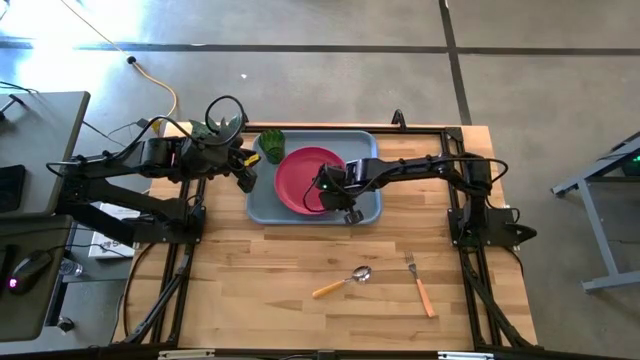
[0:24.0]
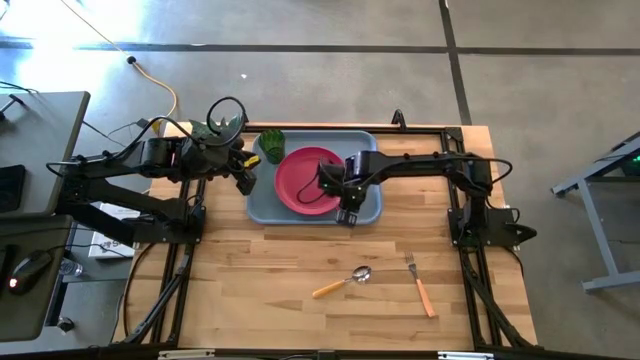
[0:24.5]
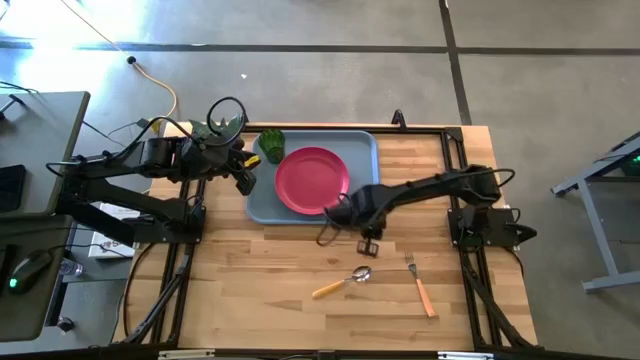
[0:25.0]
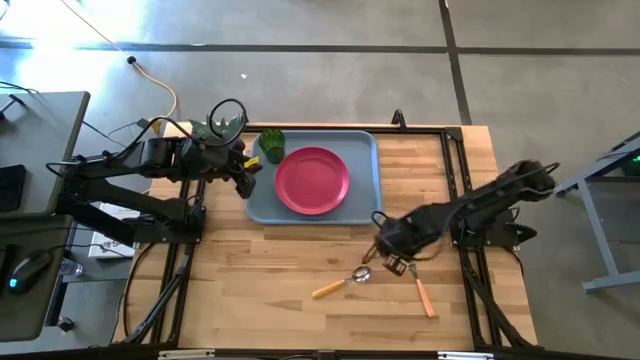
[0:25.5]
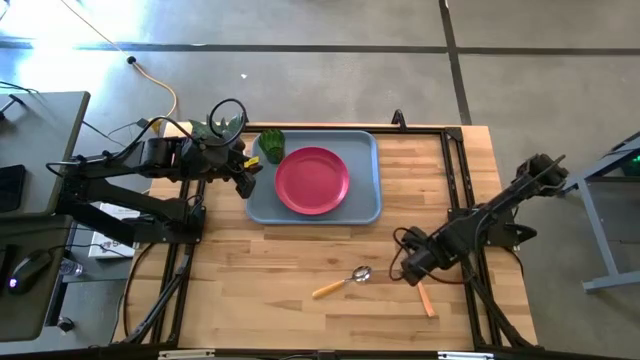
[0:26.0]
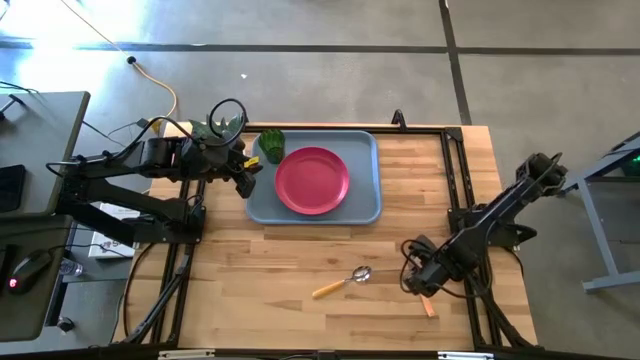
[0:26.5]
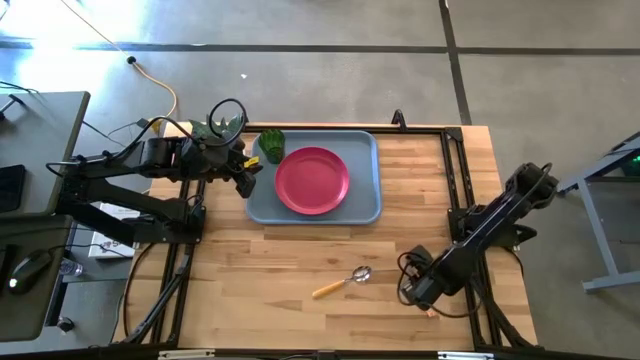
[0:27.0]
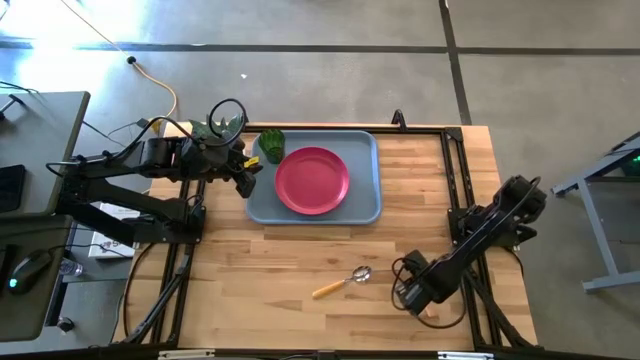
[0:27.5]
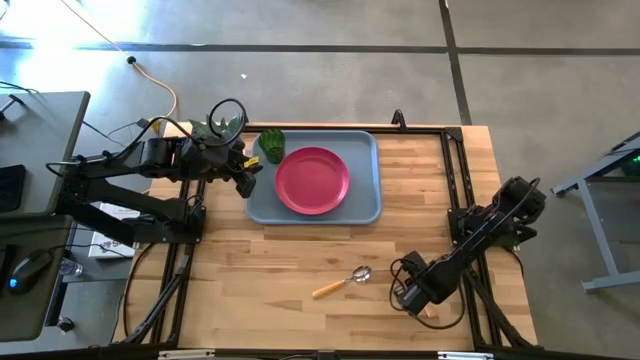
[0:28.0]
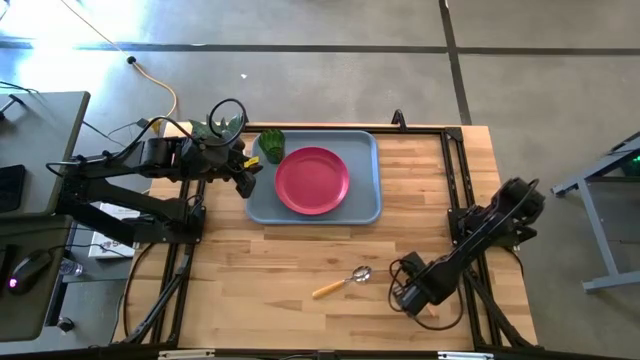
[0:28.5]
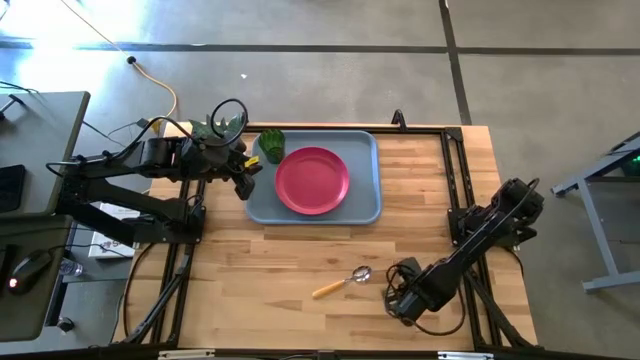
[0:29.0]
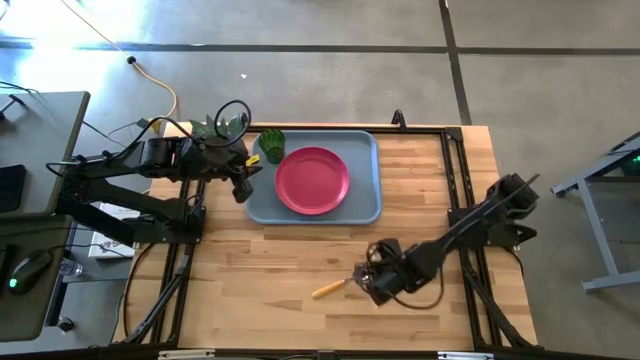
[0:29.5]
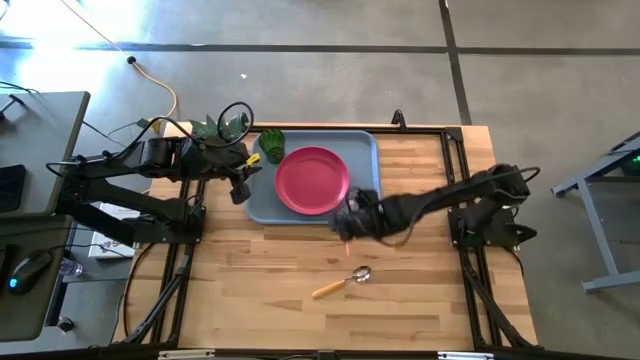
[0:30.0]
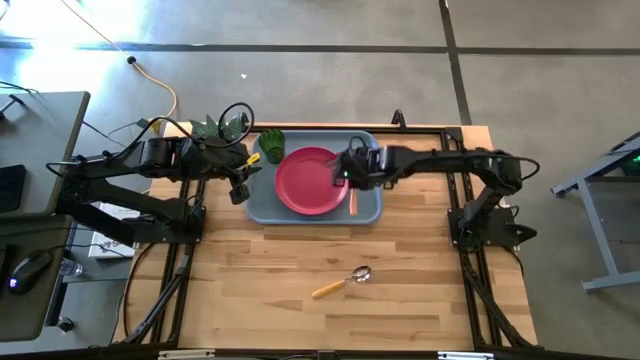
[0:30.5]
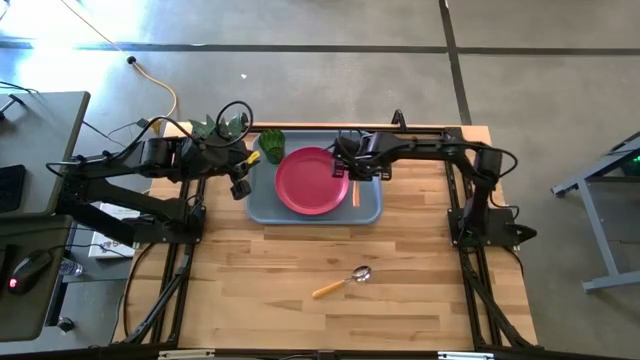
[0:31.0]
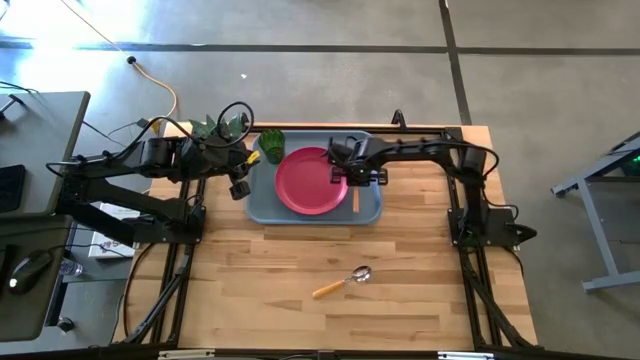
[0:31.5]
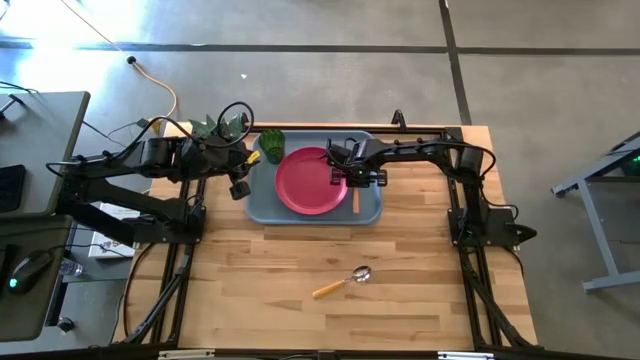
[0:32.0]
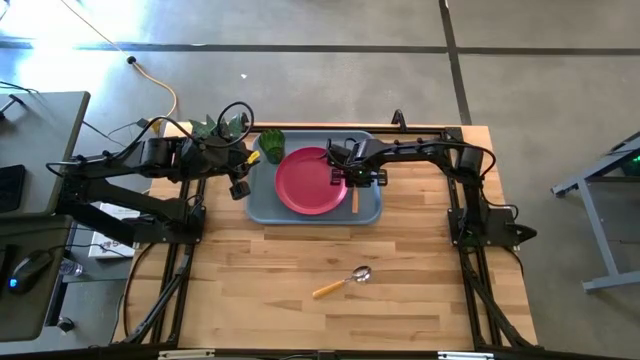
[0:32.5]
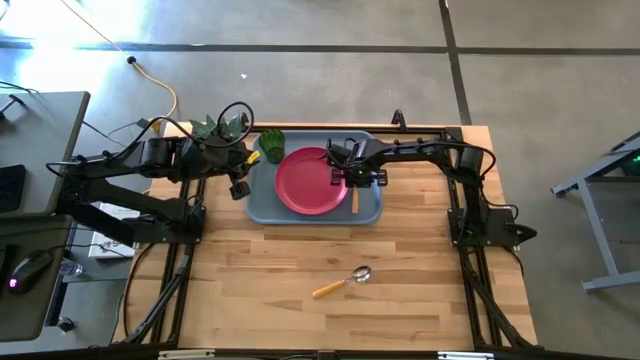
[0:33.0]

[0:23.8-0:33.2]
Task: Pick and place plate/cup/fork/spoon on tray
Put the orange fork on the blue tray to the right of the pink plate

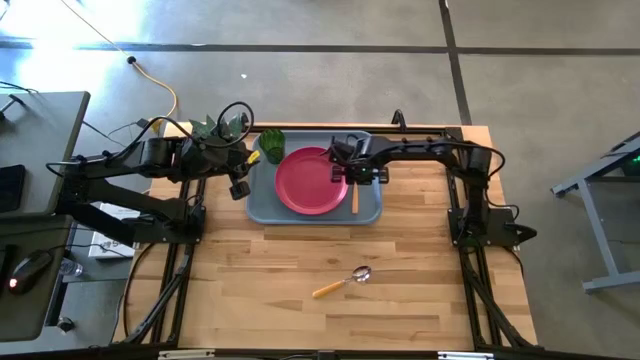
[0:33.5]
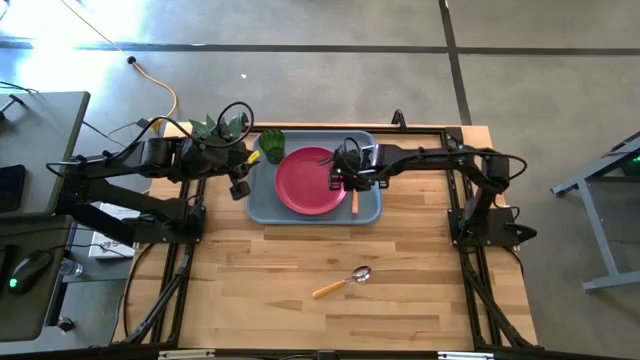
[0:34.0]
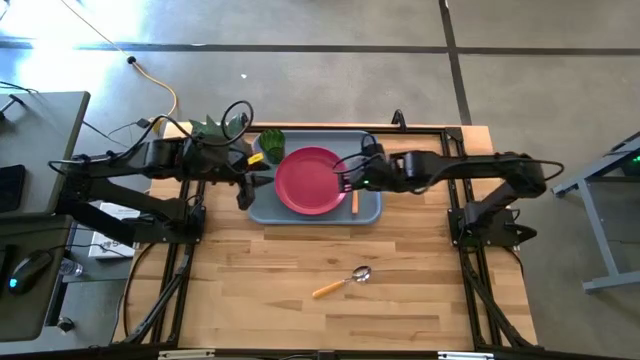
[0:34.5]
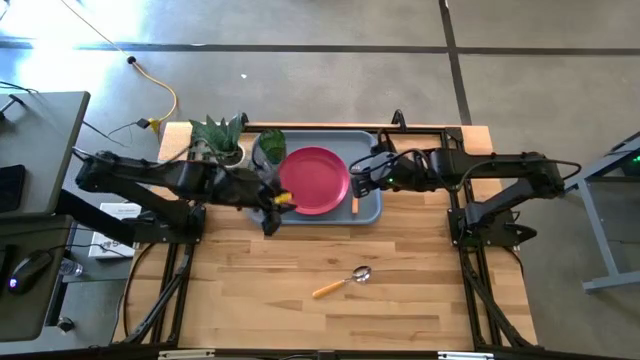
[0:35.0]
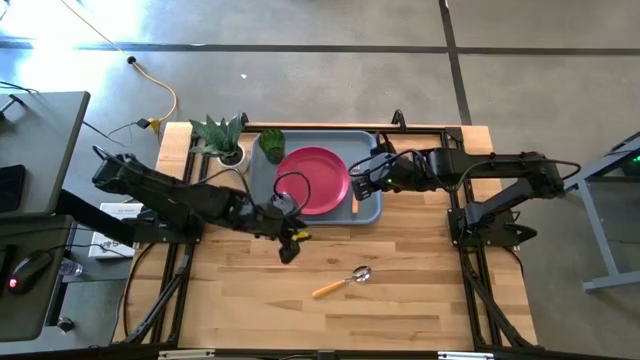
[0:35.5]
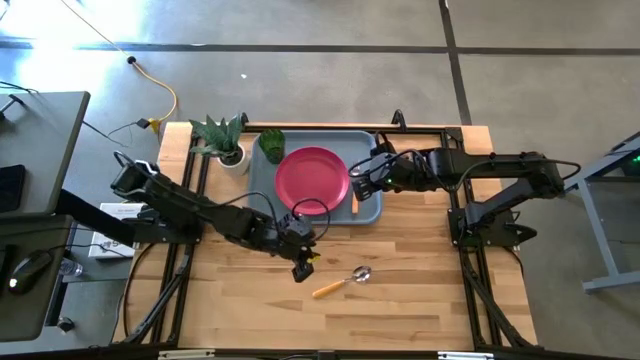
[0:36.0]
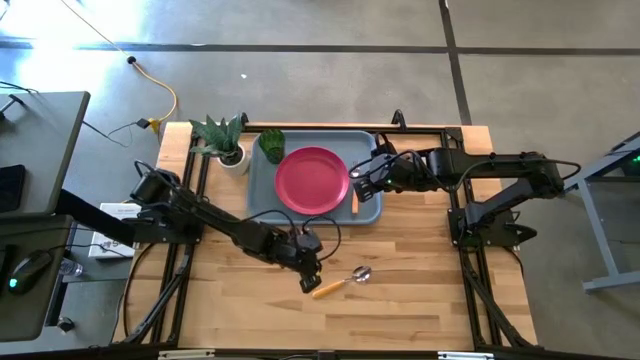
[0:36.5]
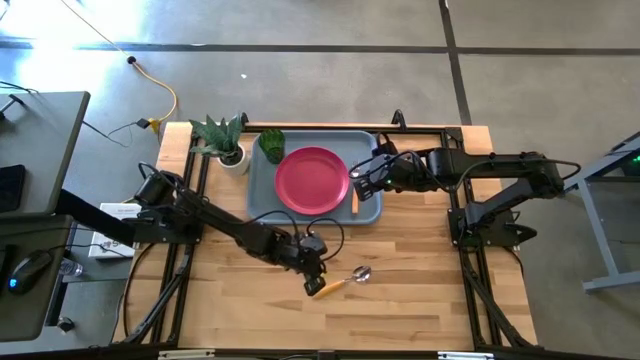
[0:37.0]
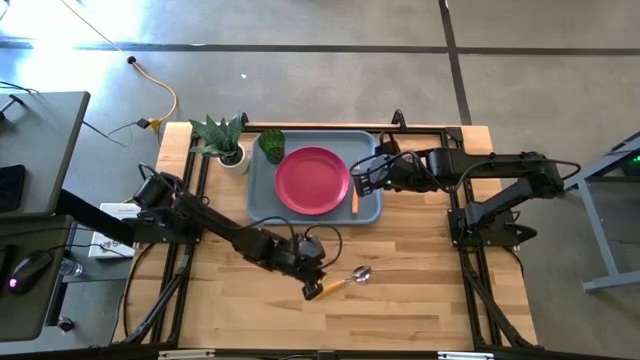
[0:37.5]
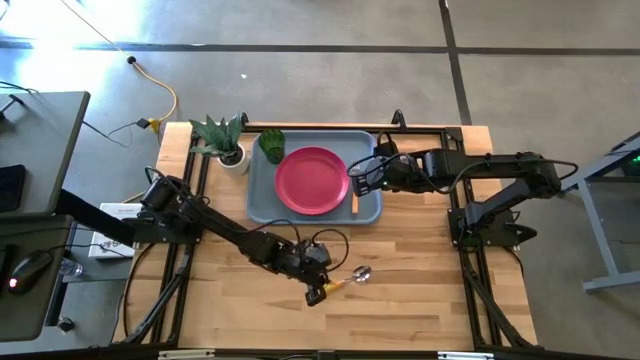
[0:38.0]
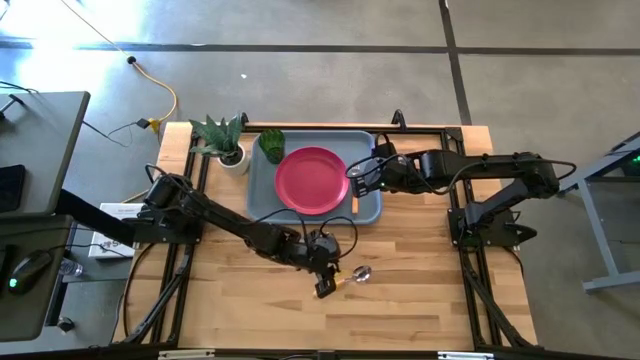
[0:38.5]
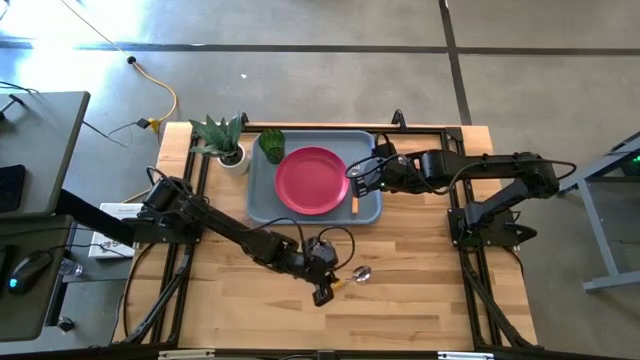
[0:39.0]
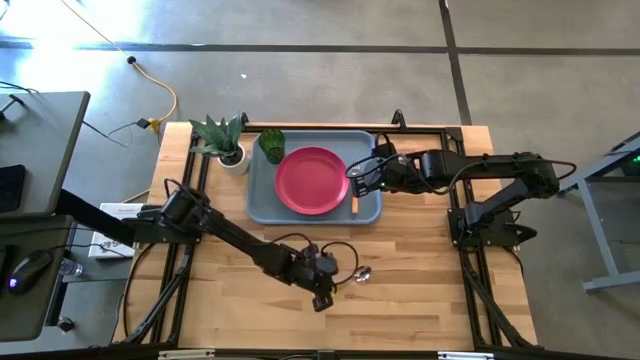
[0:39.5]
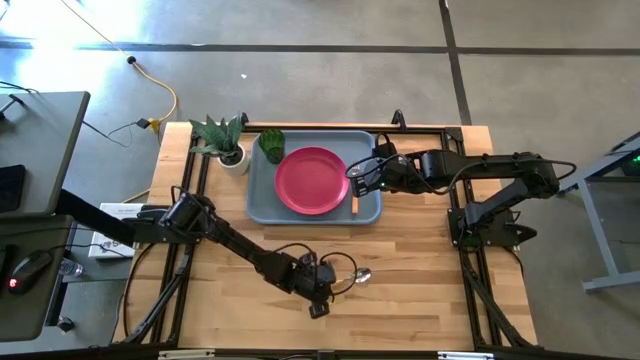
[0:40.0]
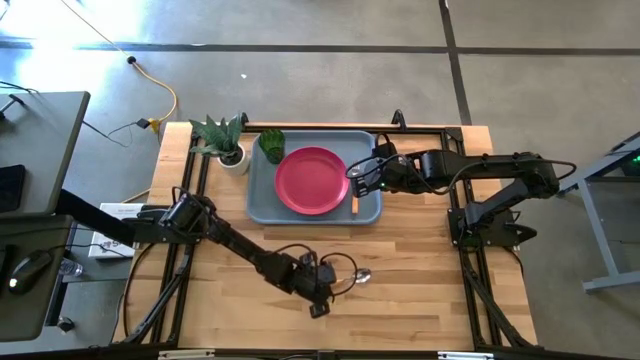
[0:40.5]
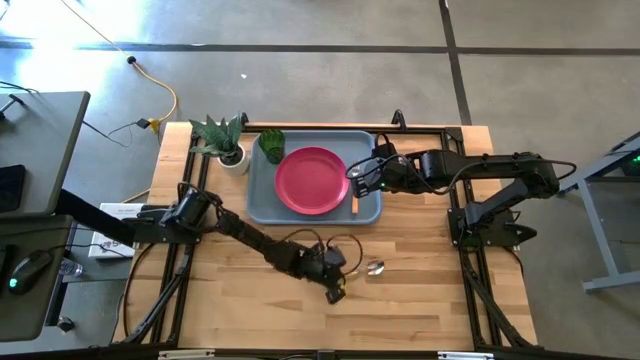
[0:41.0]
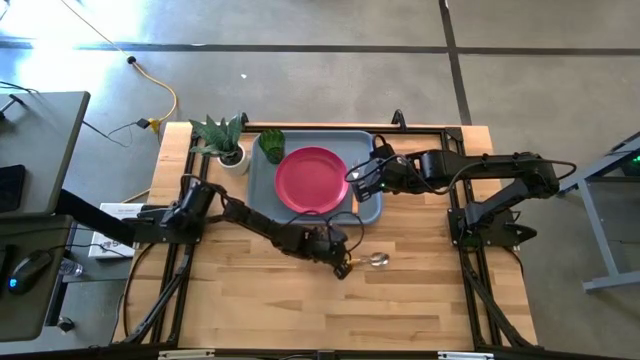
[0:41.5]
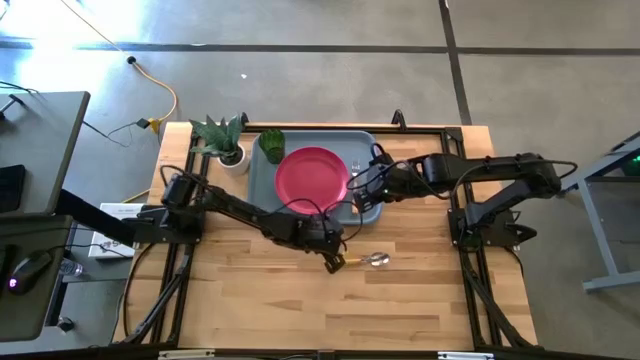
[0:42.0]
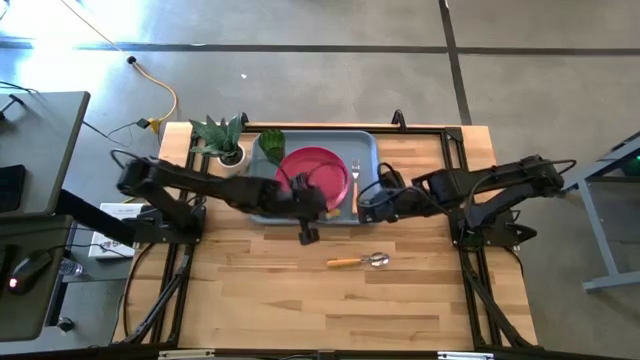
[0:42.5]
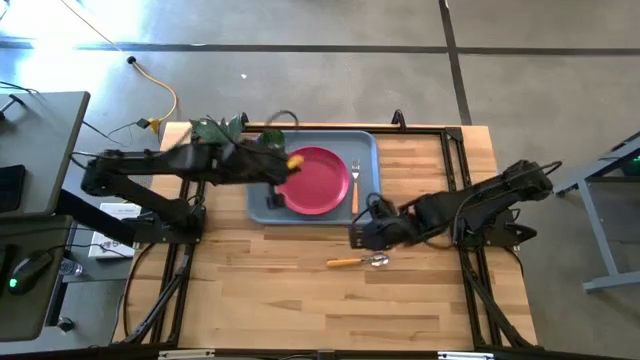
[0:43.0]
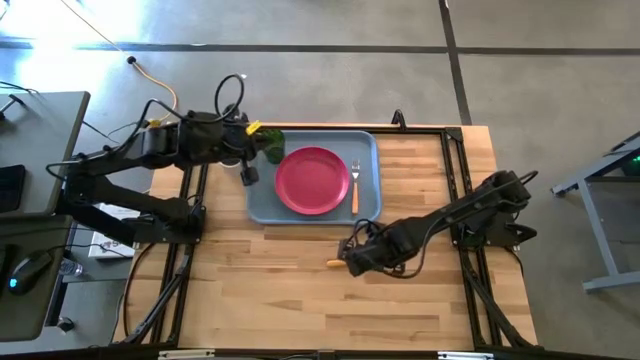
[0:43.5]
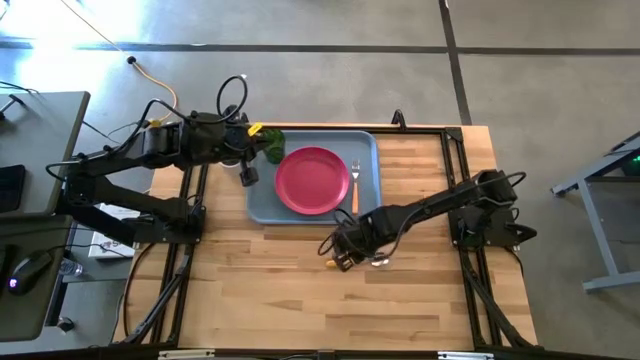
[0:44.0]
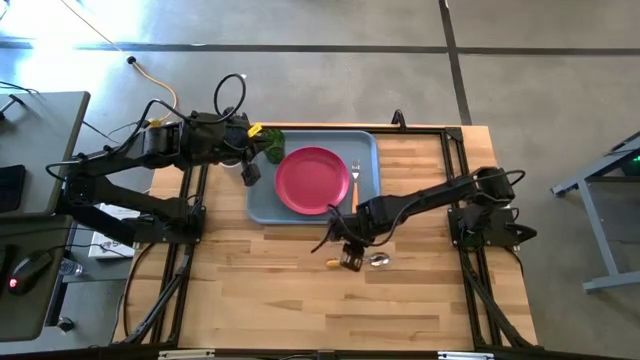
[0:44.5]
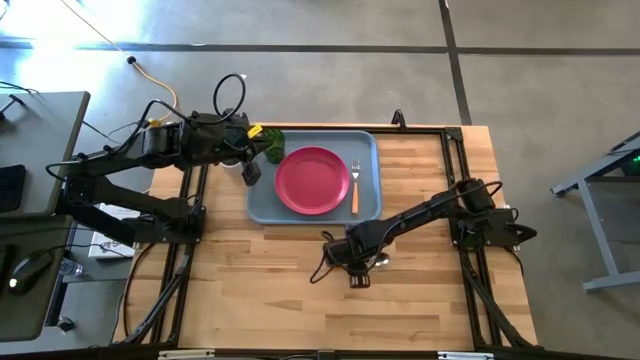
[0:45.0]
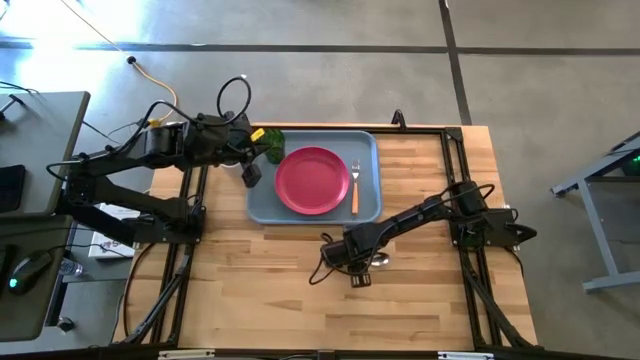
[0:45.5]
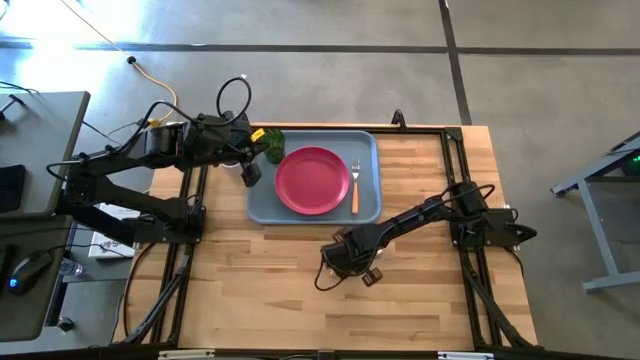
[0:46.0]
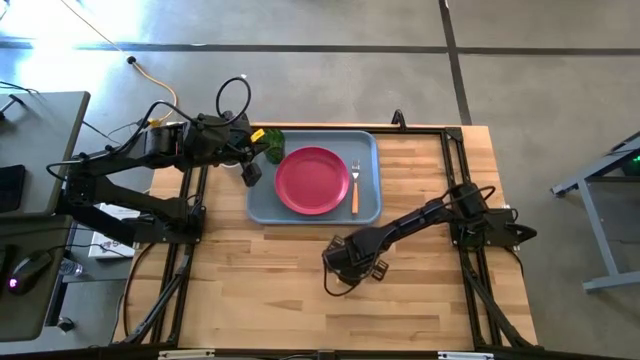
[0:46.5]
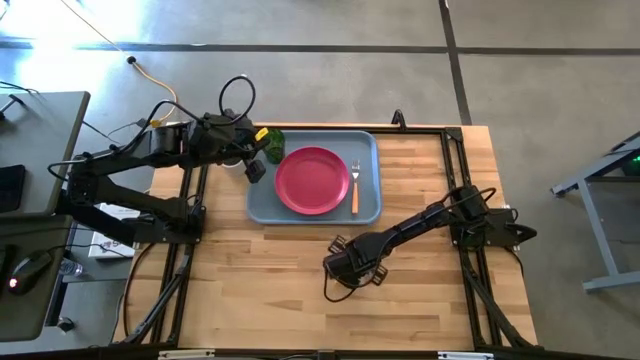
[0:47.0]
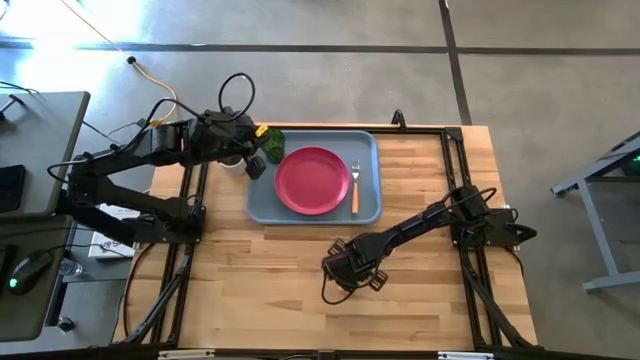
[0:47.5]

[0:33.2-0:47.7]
Put the orange spoon on the blue tray to the right of the orange fork
